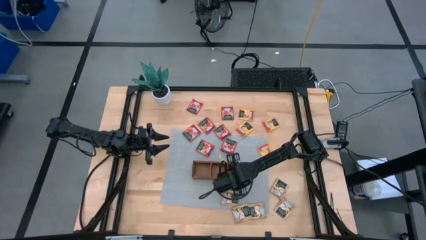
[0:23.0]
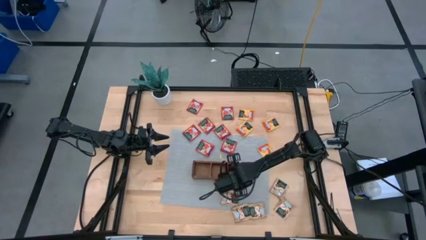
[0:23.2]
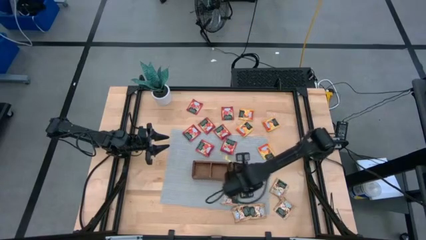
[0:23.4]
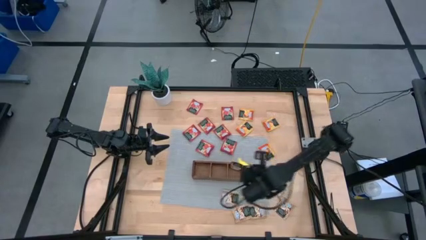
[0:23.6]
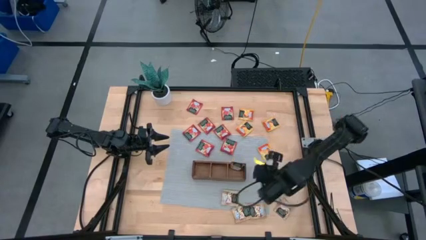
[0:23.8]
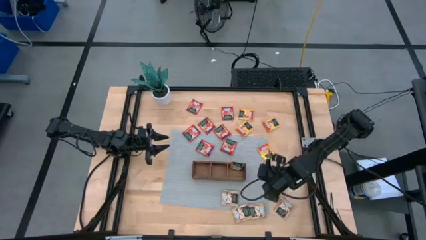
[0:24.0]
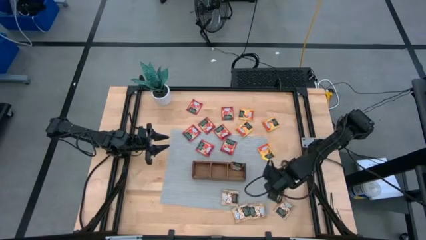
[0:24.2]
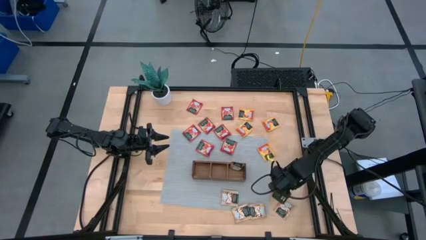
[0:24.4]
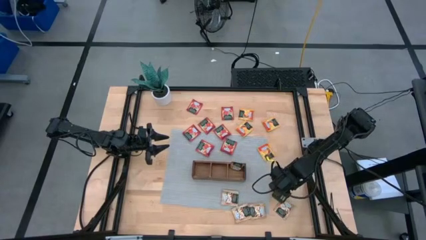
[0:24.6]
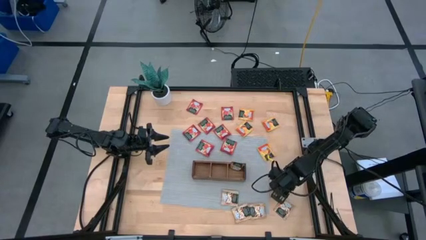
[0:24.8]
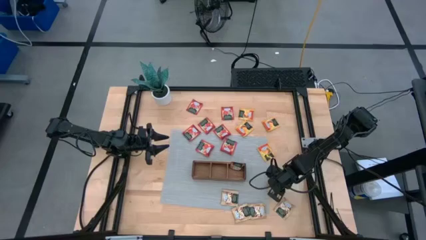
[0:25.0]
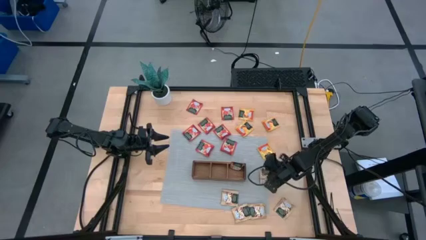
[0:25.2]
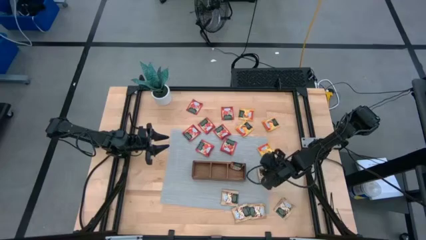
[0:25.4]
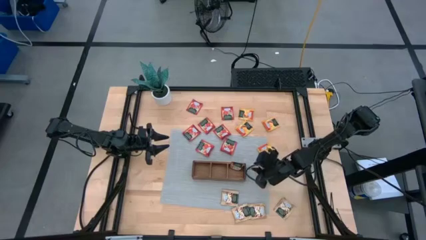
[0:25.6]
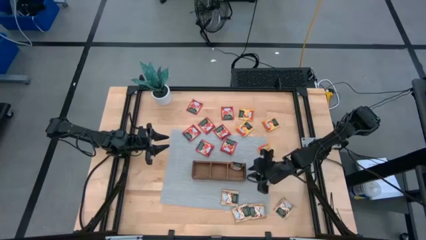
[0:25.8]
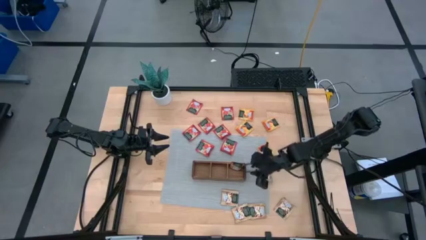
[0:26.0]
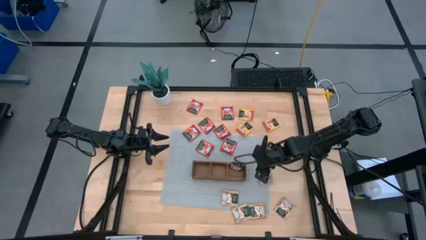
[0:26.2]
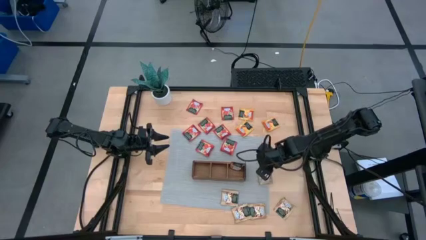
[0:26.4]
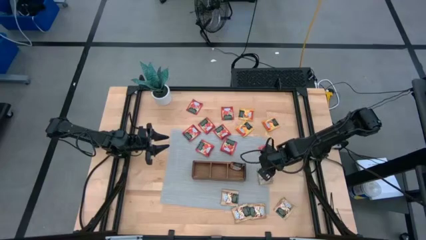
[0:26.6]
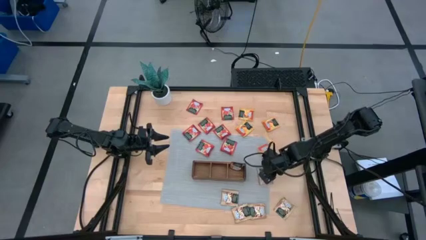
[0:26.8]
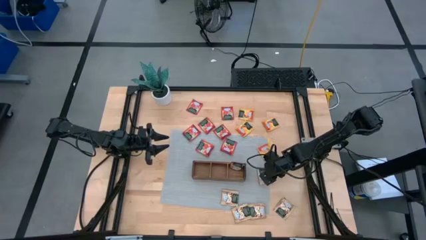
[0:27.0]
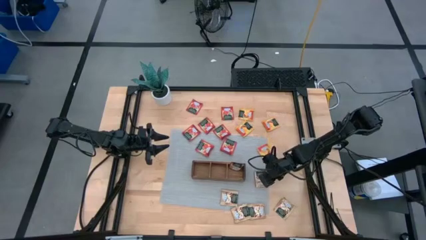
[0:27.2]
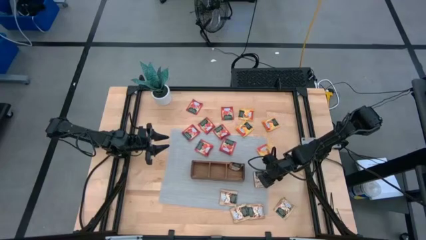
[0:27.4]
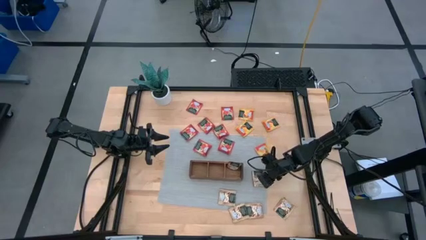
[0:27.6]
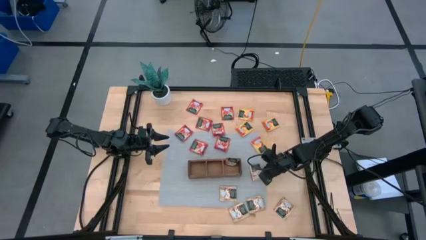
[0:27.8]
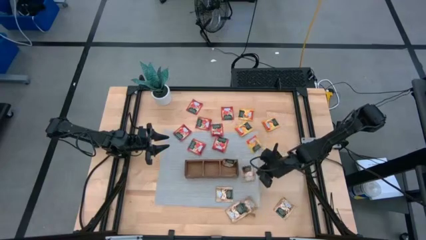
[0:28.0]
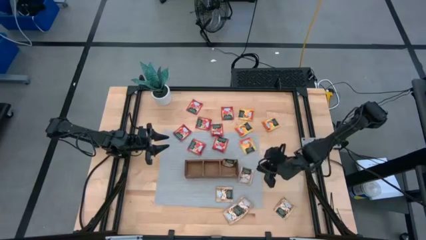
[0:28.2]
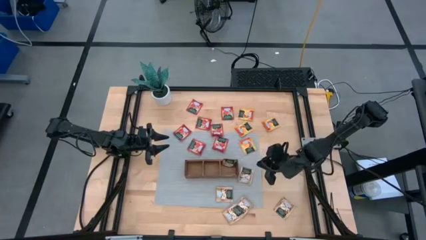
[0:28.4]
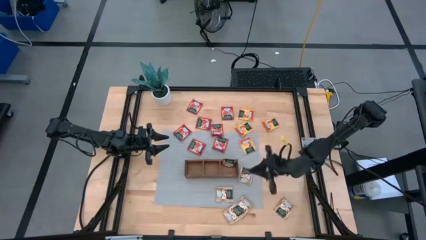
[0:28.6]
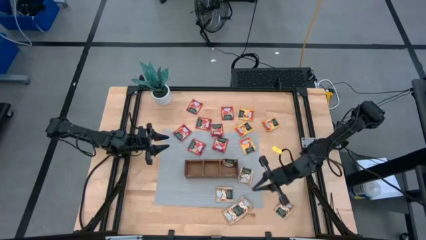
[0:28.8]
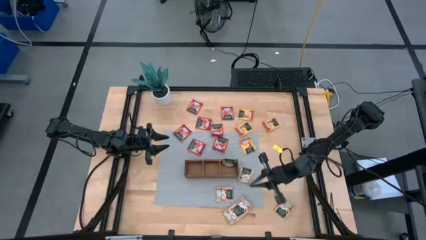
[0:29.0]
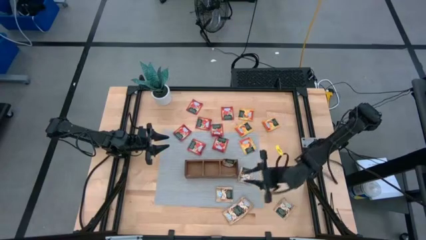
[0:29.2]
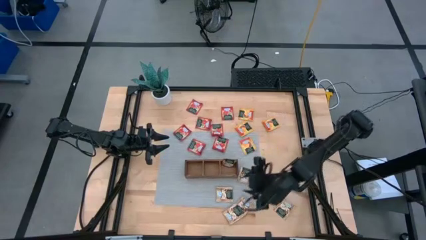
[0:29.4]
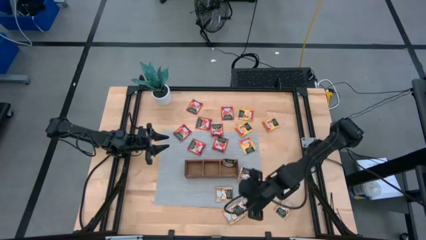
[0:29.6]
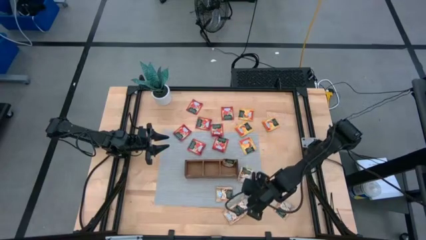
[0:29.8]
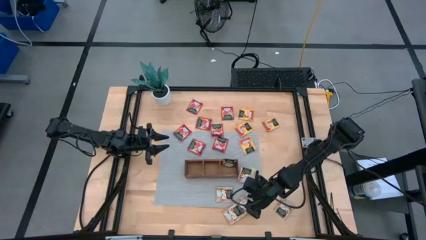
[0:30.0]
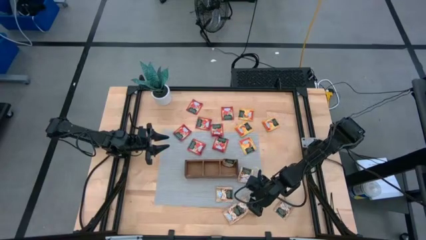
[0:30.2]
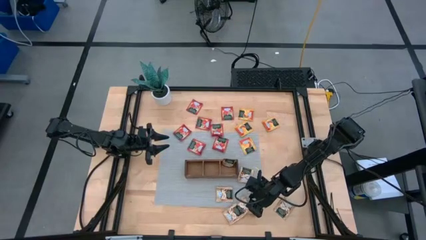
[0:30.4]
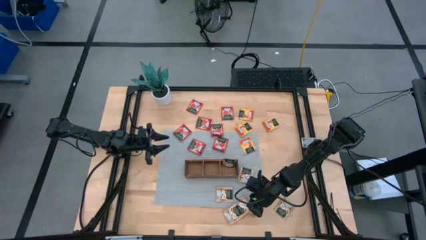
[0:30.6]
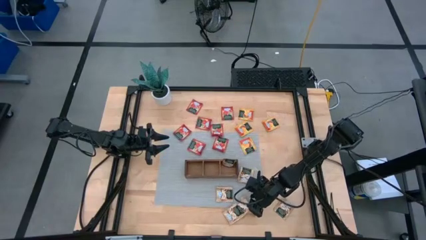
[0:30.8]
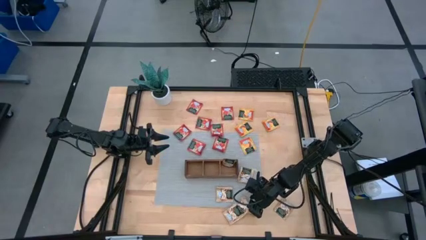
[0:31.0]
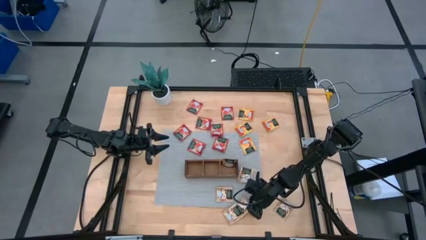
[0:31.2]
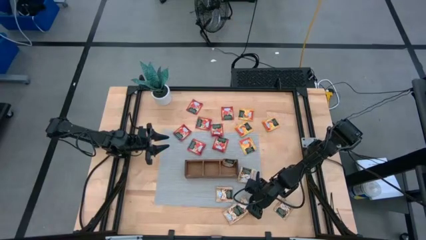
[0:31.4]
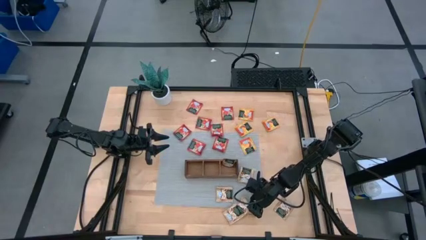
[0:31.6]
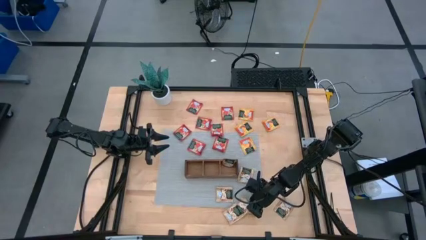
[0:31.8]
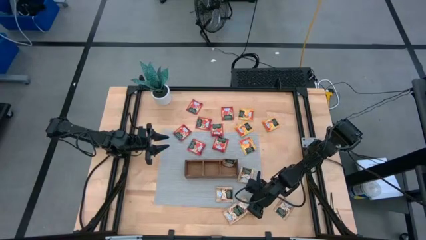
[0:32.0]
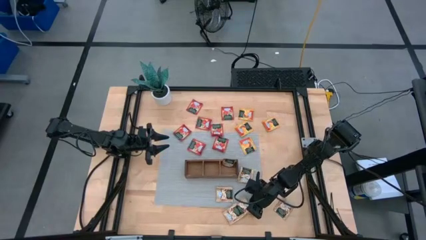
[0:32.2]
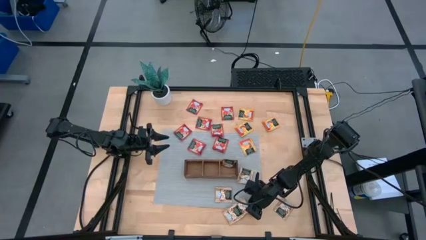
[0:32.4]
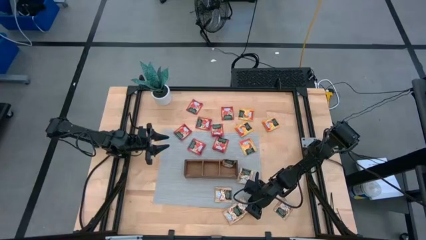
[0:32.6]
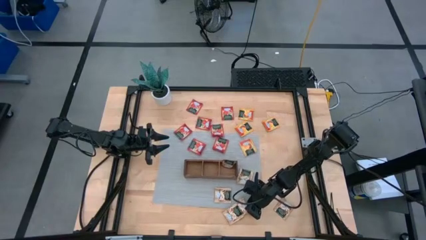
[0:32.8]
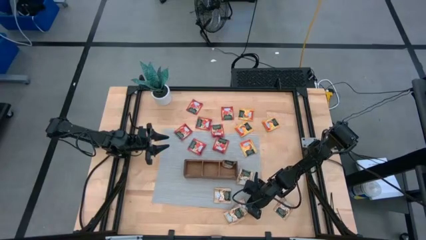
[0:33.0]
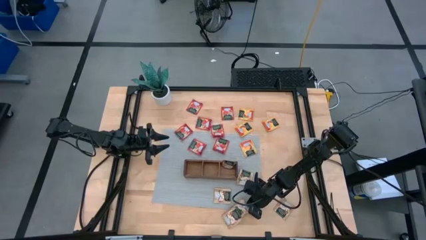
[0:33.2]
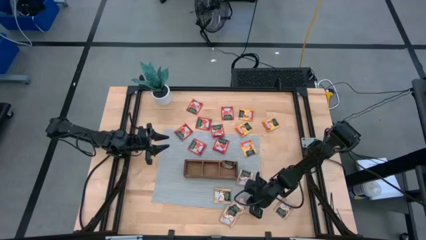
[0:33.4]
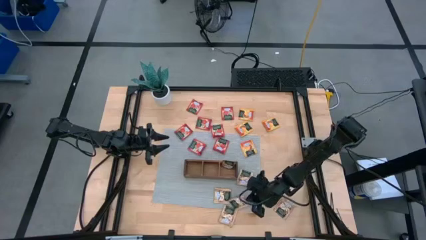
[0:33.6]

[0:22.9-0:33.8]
Task: Pick & Place Tea
Put the brown tea bag into the right compartment of the wood organizer
